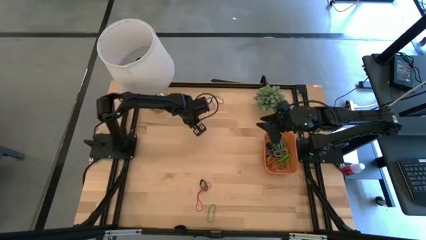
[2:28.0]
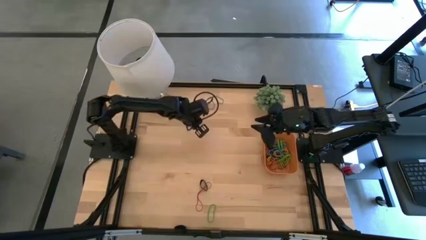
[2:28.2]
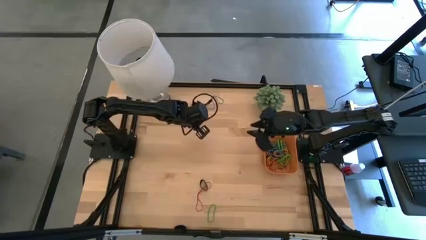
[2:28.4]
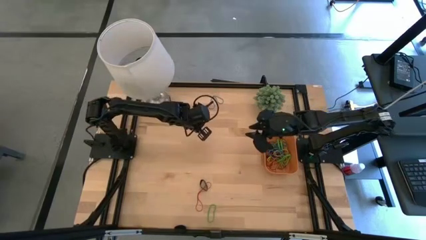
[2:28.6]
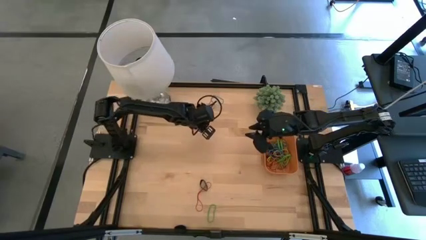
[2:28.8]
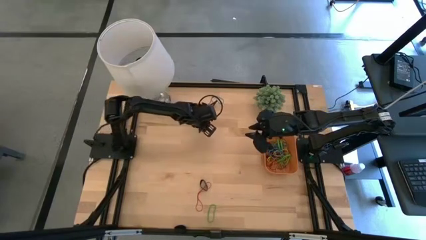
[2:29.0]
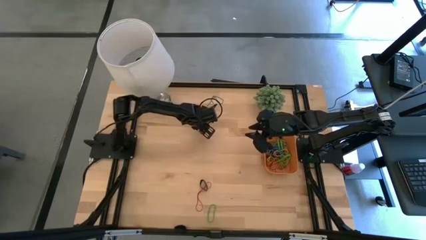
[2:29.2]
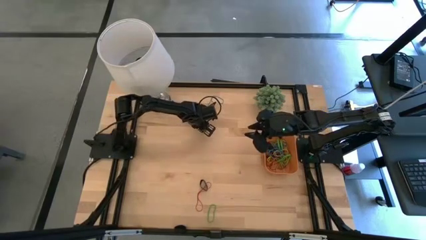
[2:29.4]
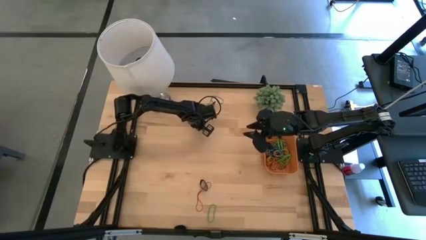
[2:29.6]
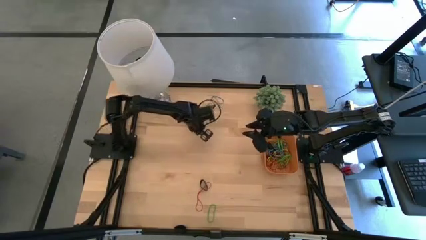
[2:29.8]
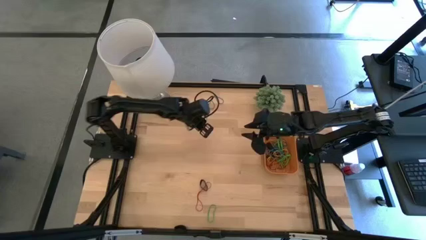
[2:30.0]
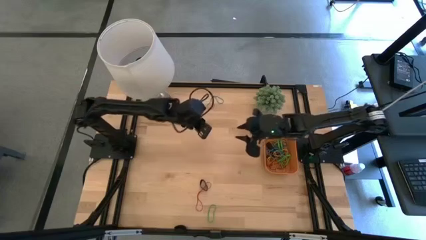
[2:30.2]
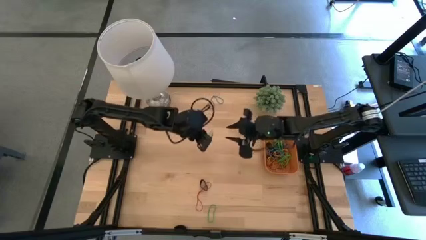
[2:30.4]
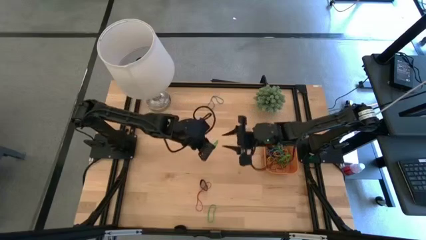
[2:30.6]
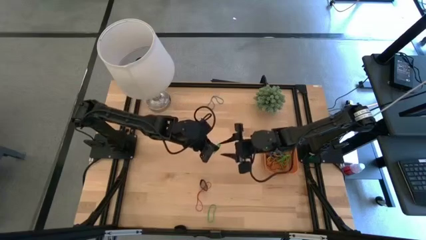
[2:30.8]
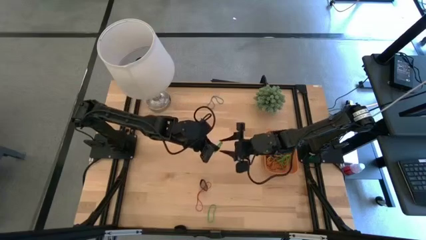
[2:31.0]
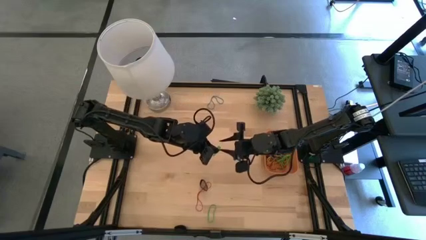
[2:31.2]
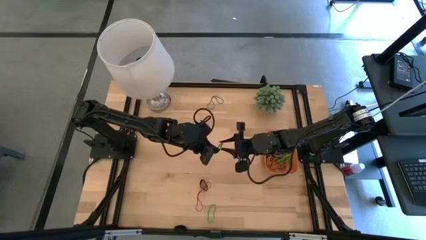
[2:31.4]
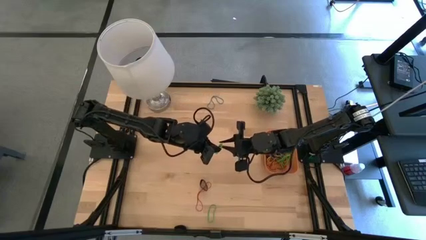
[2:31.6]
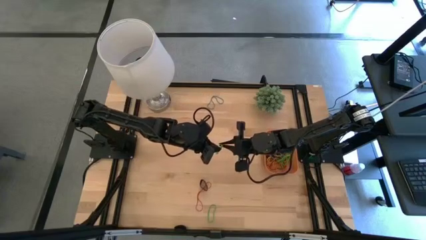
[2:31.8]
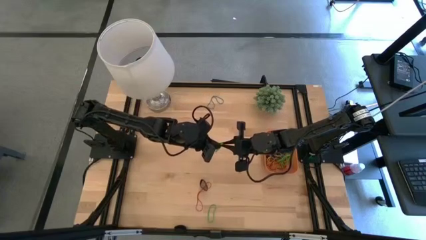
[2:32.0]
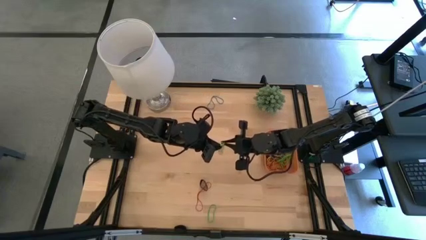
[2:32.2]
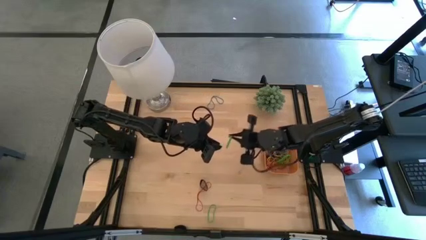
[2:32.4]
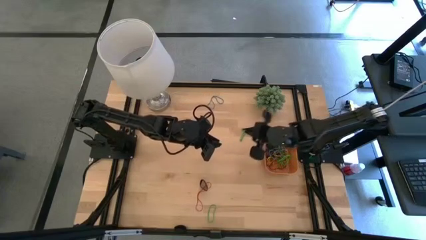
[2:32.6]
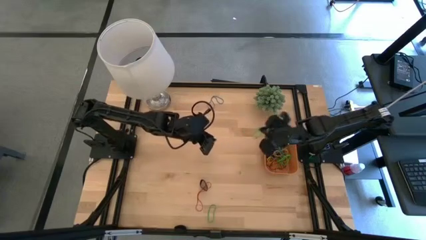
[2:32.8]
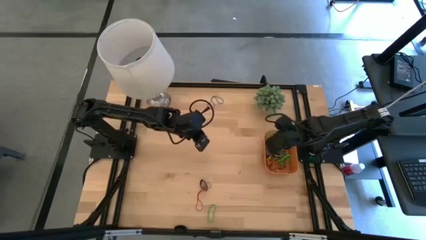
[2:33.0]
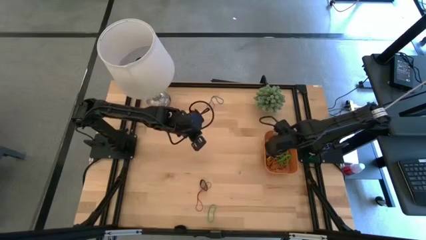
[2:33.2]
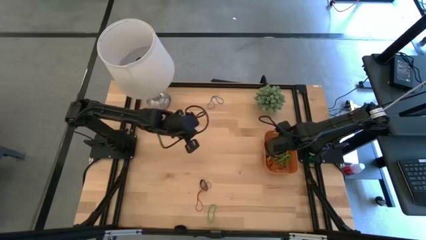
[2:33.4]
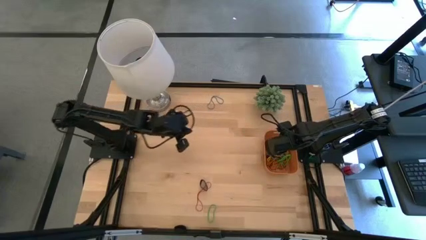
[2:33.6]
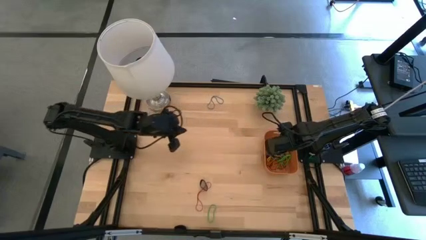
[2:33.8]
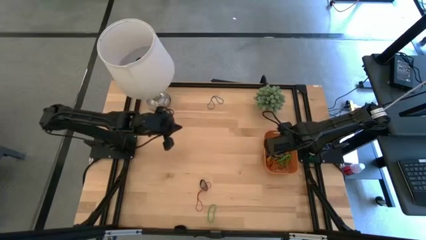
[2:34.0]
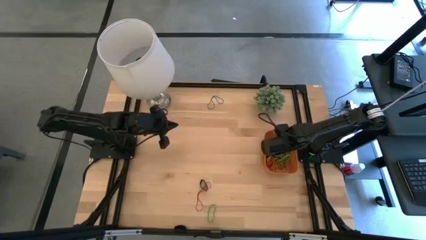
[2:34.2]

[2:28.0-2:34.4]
Task: Pick and place rubber bands into bin
Put the green rubber band into the orange bin

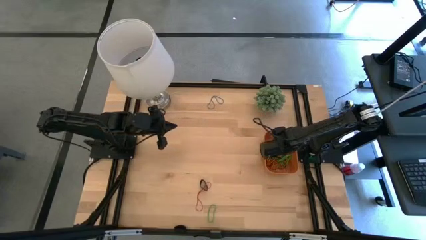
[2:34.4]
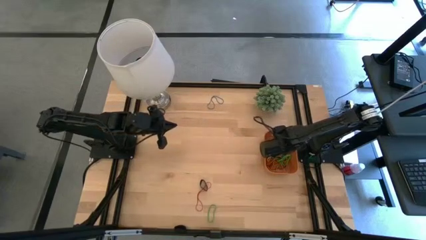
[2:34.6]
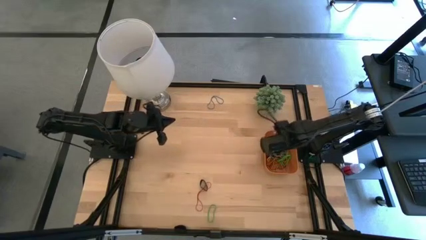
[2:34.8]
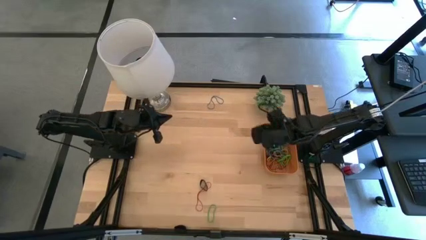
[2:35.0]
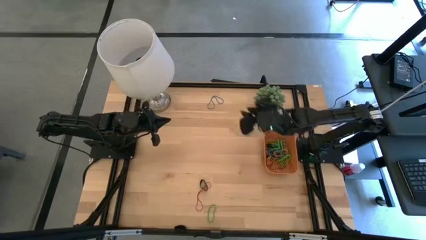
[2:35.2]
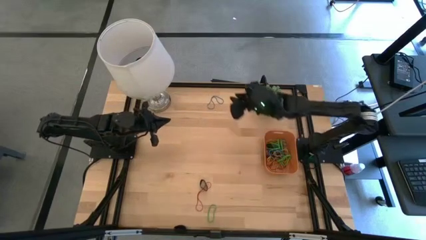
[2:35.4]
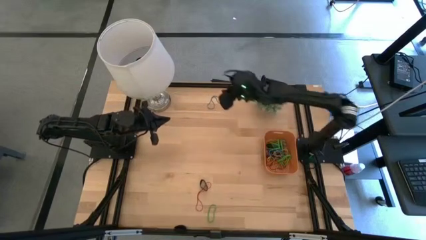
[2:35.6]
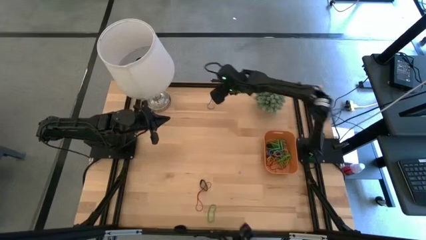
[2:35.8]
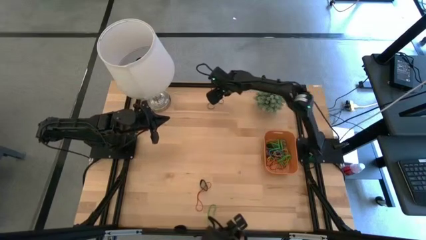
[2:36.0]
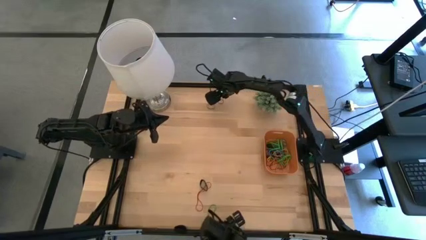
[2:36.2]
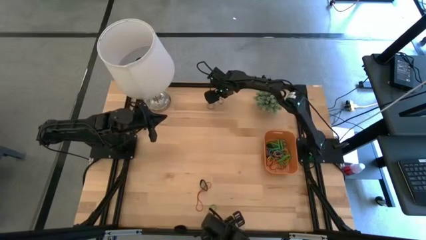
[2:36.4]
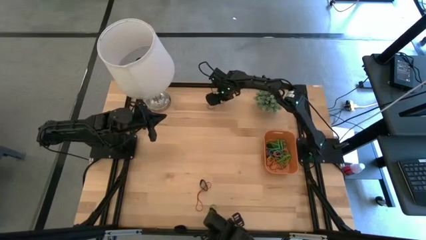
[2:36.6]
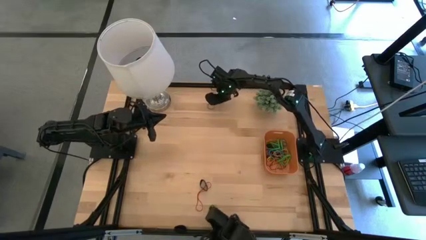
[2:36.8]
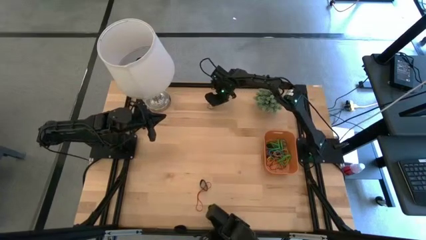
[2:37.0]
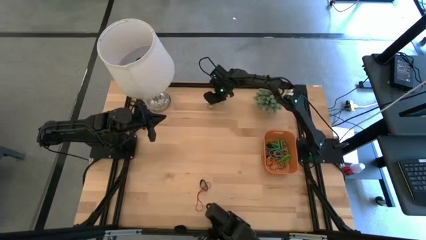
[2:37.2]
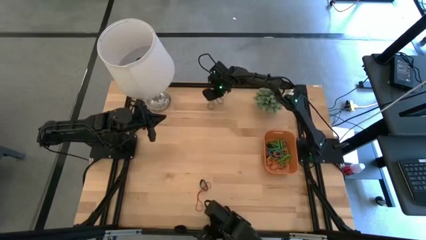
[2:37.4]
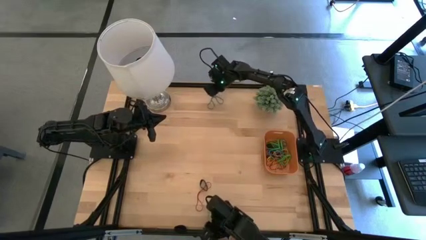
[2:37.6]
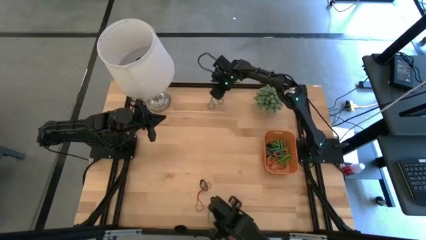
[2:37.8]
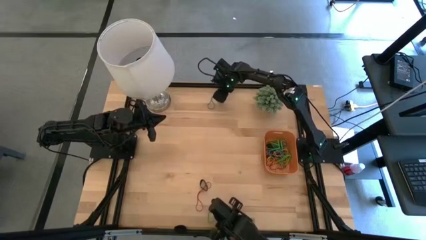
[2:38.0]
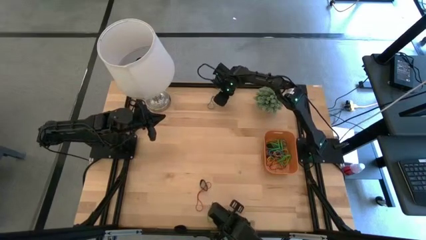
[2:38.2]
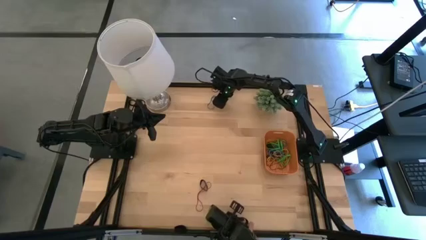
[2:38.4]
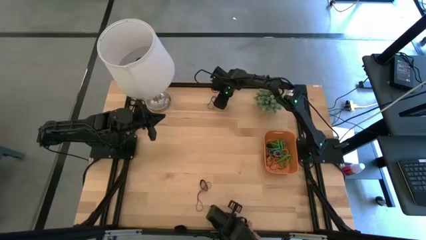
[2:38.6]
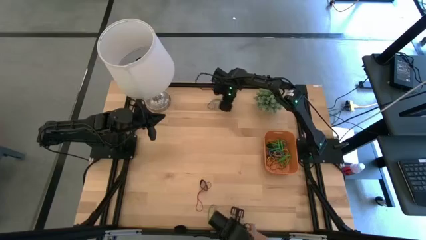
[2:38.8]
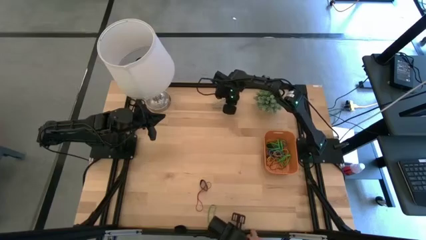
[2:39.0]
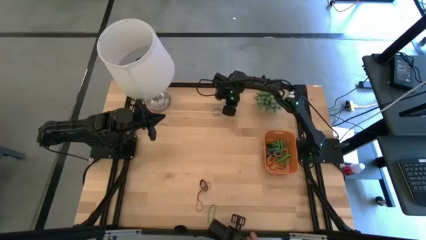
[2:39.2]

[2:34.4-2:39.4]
Put the blue rubber band into the orange bin

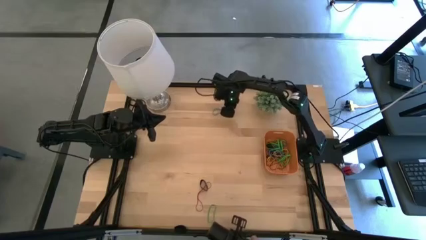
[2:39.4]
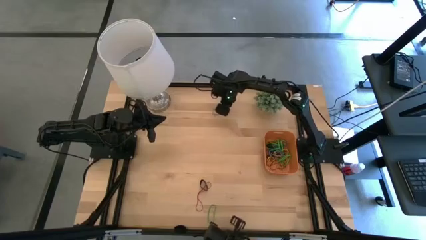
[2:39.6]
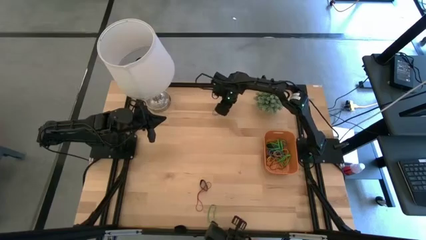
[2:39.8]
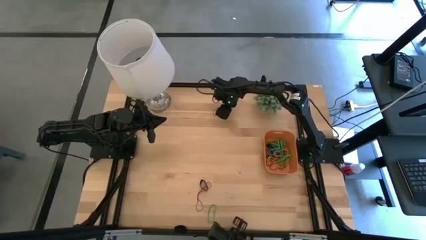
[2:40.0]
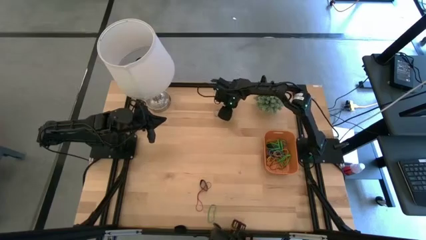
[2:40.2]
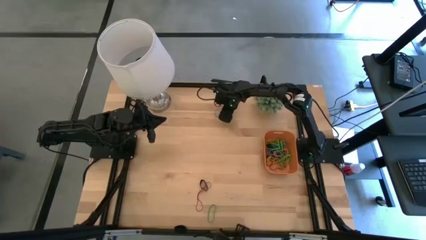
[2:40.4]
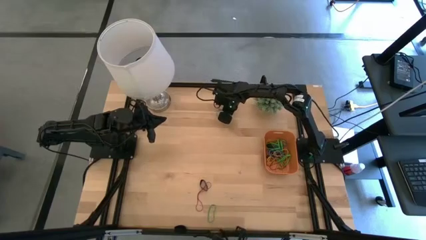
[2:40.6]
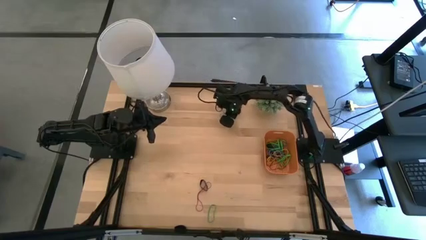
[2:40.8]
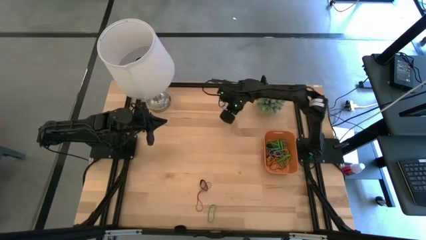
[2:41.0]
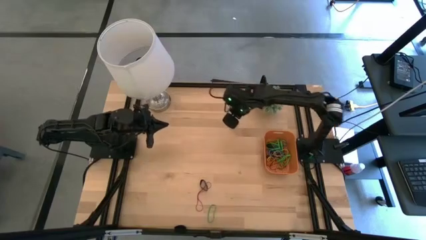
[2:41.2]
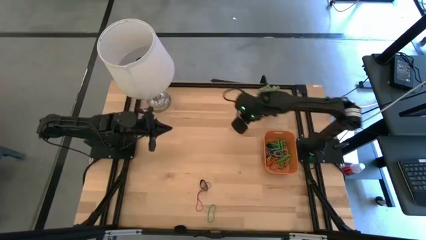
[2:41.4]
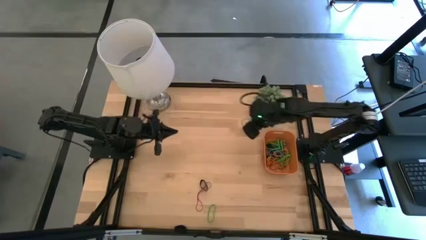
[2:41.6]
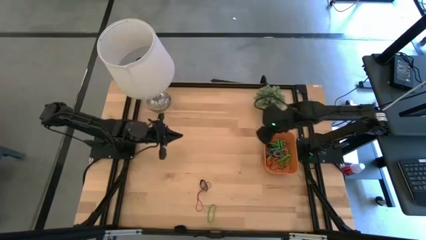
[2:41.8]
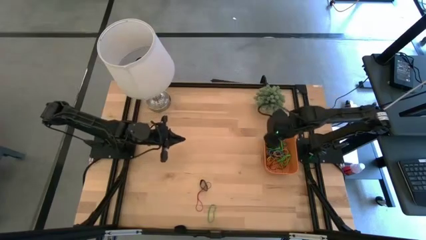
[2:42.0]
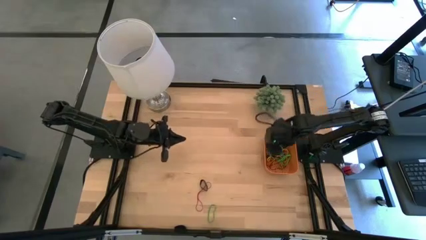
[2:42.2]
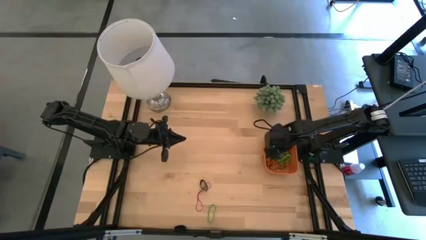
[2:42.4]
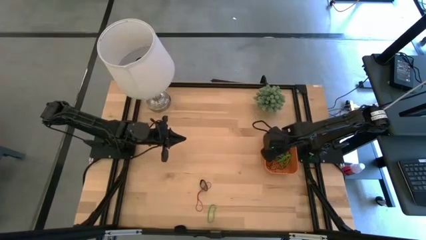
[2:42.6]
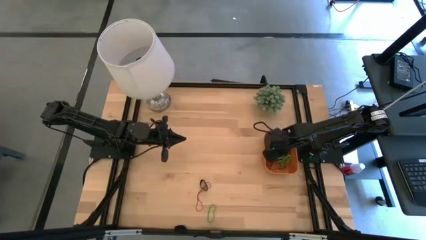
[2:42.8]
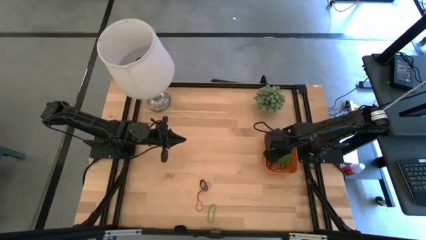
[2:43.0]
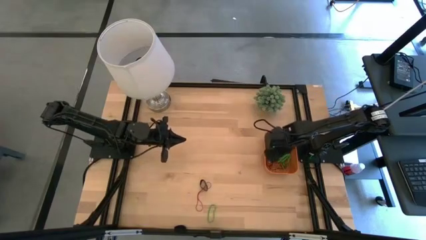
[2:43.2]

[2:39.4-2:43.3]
Put the blue rubber band into the orange bin
